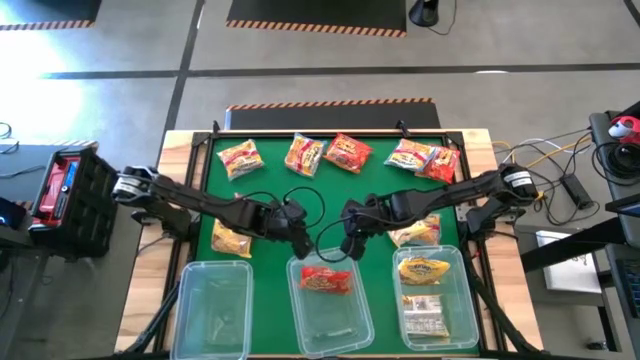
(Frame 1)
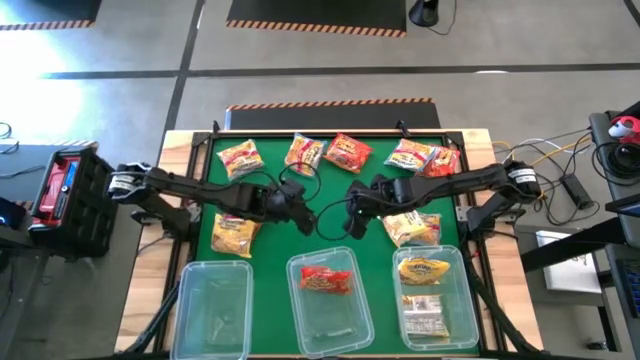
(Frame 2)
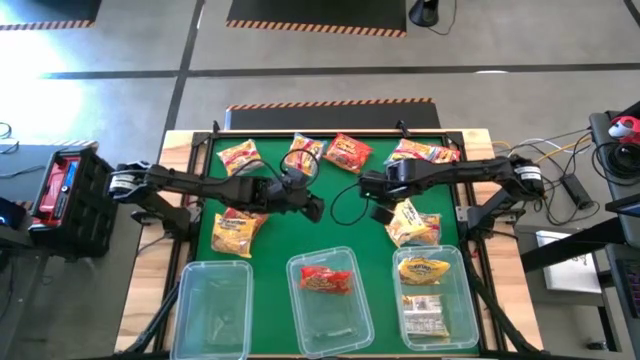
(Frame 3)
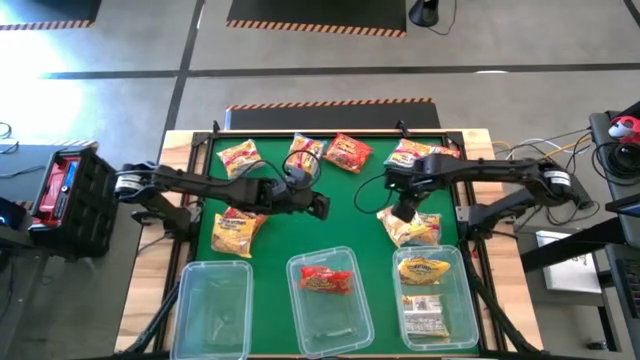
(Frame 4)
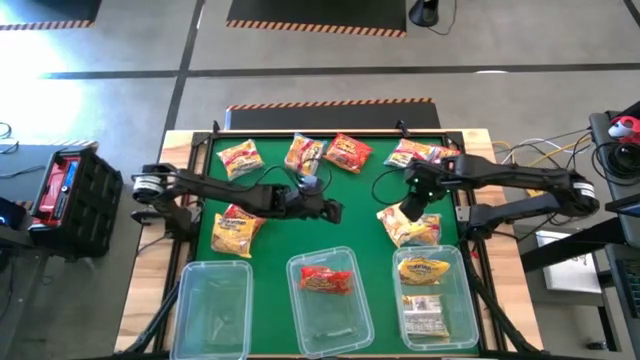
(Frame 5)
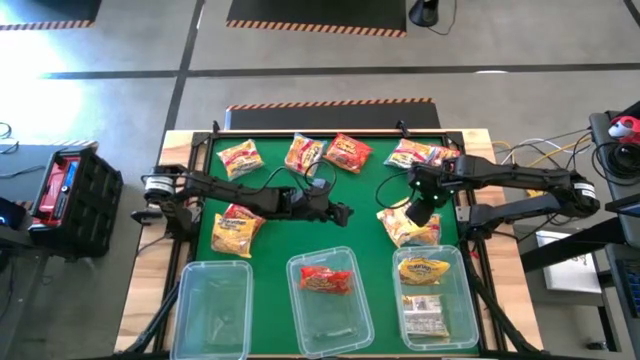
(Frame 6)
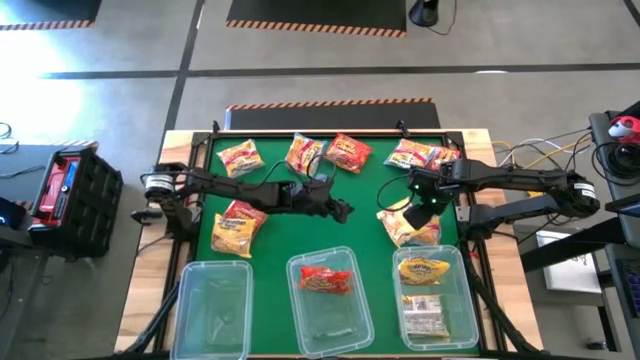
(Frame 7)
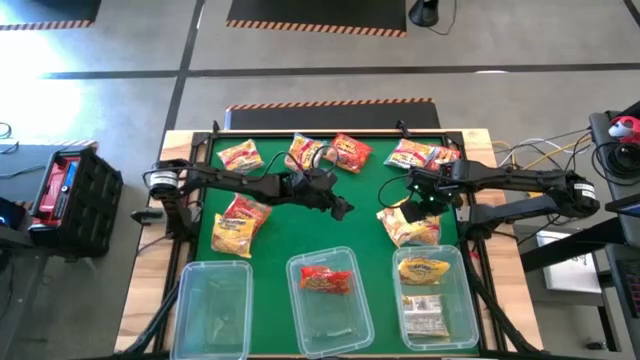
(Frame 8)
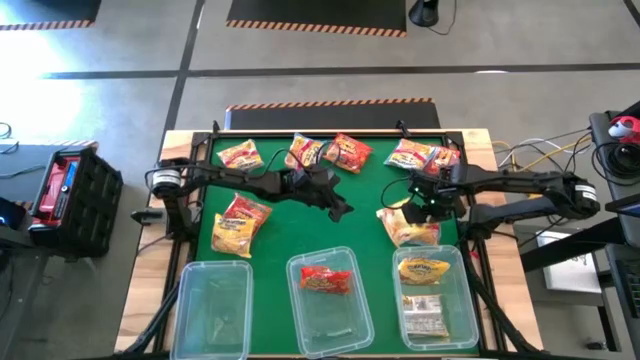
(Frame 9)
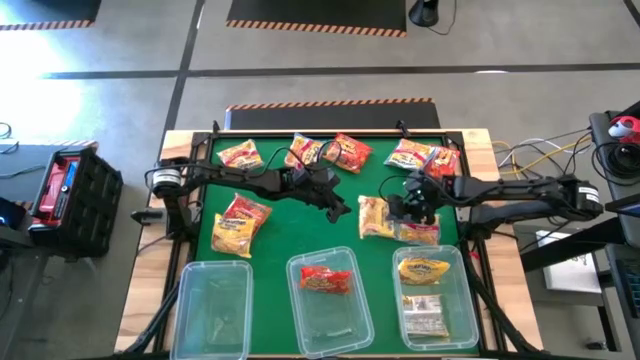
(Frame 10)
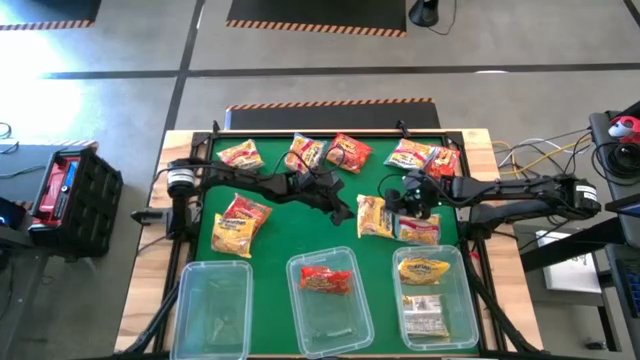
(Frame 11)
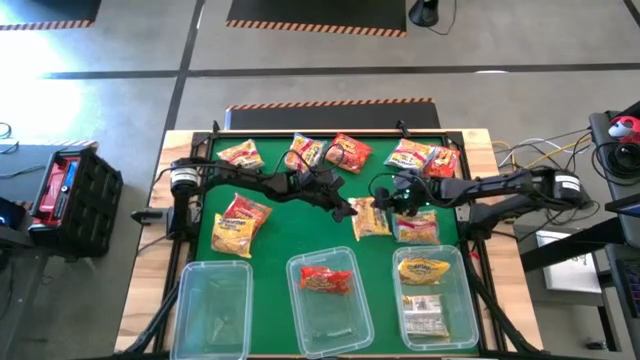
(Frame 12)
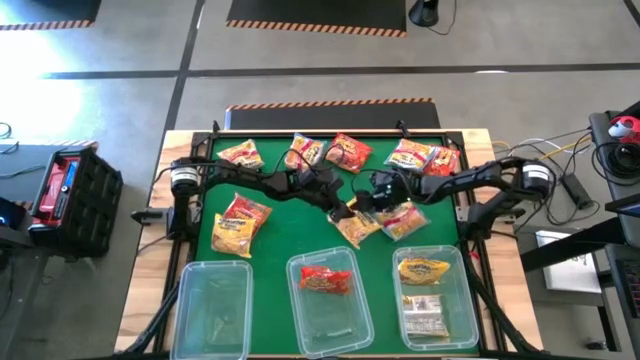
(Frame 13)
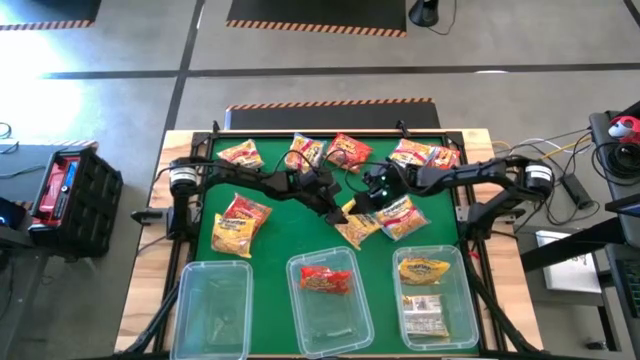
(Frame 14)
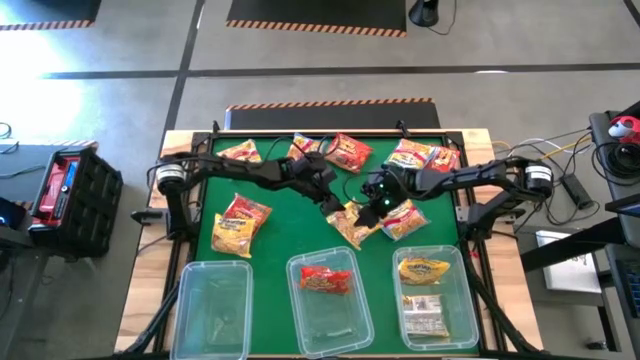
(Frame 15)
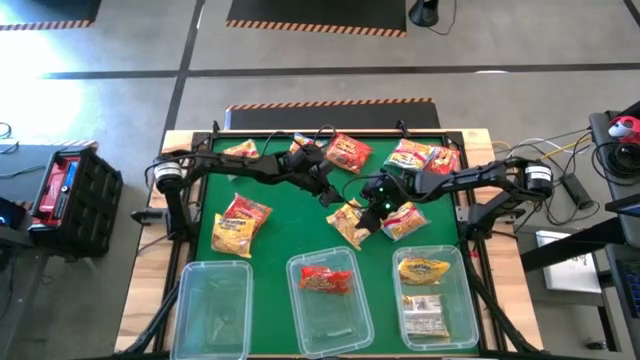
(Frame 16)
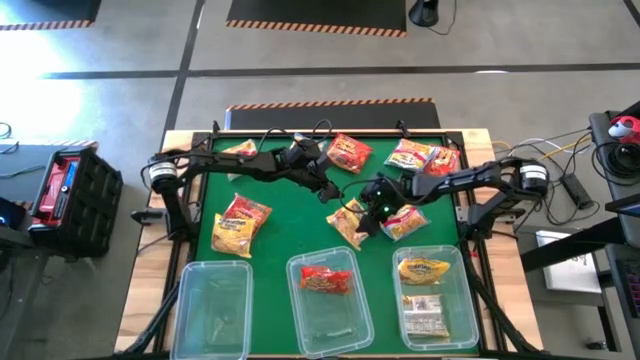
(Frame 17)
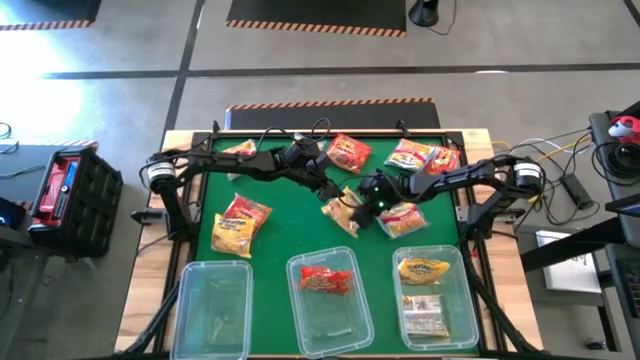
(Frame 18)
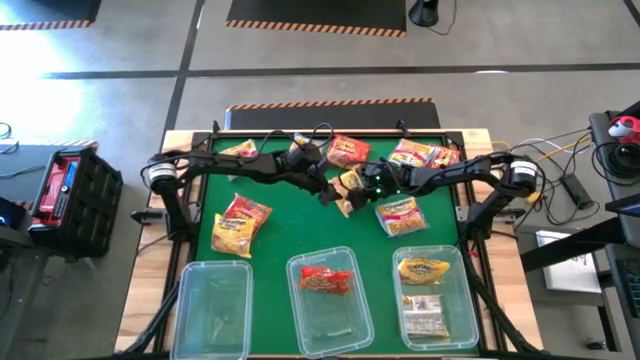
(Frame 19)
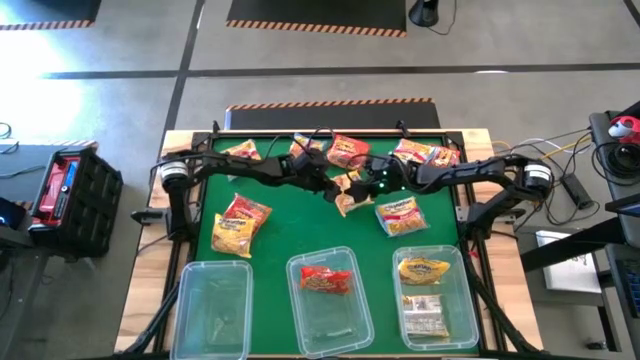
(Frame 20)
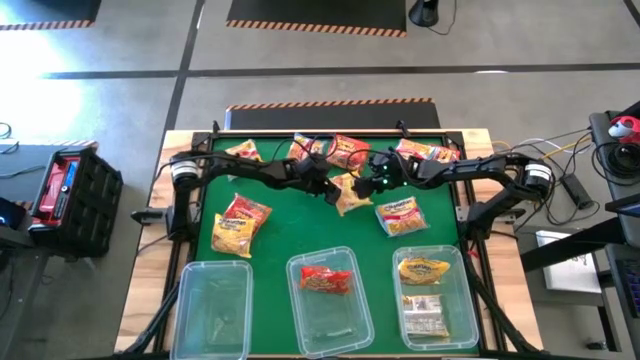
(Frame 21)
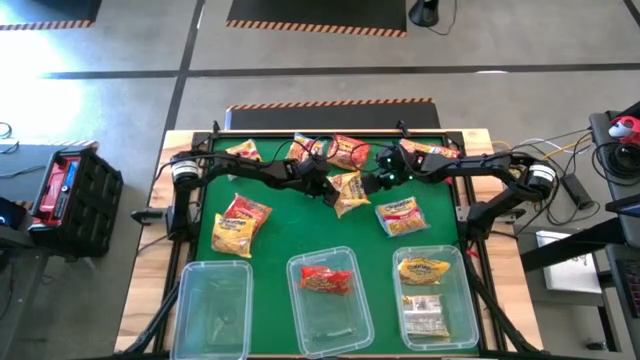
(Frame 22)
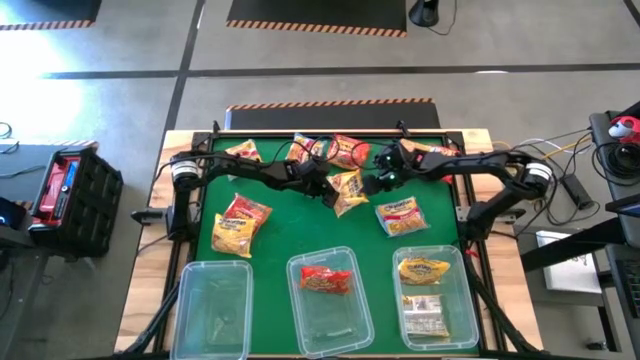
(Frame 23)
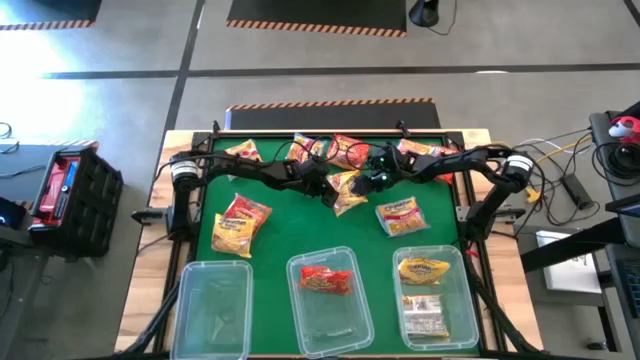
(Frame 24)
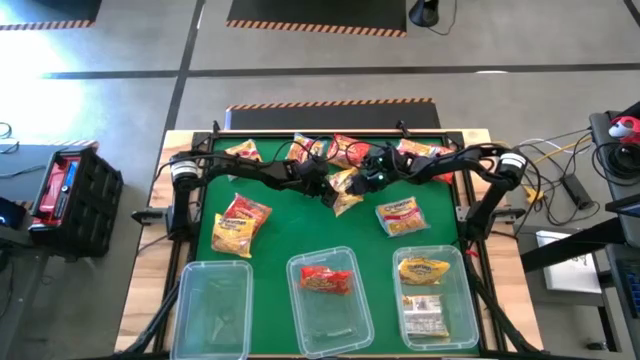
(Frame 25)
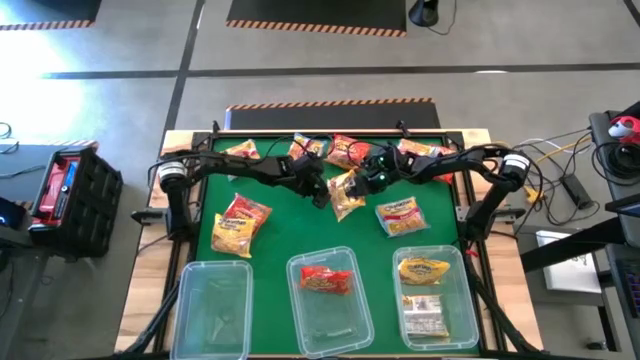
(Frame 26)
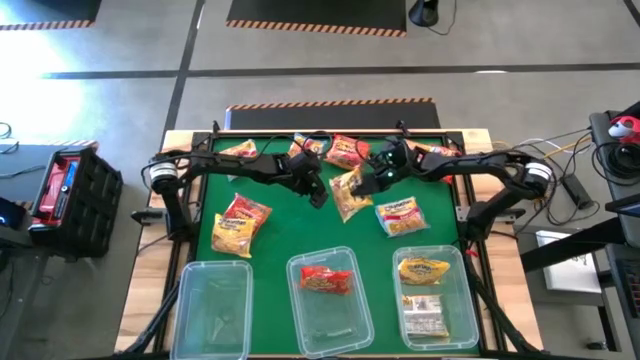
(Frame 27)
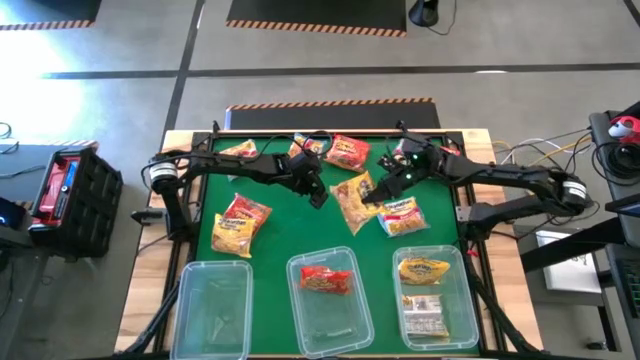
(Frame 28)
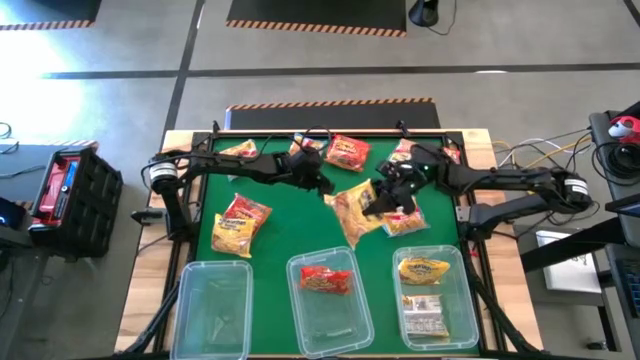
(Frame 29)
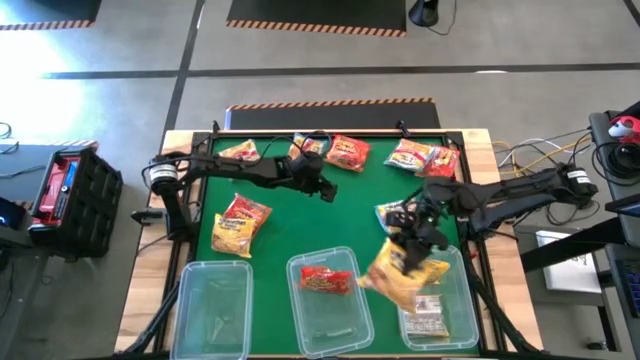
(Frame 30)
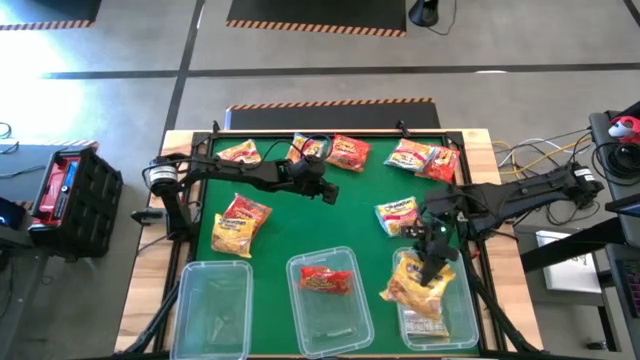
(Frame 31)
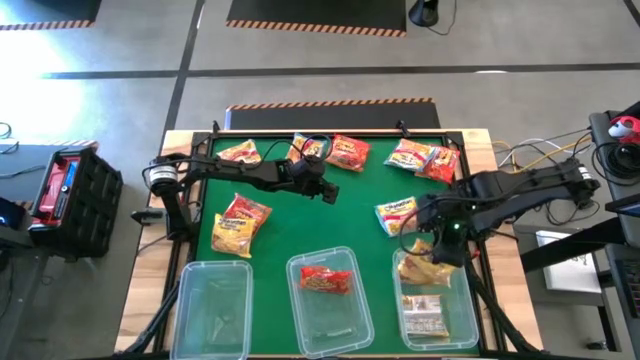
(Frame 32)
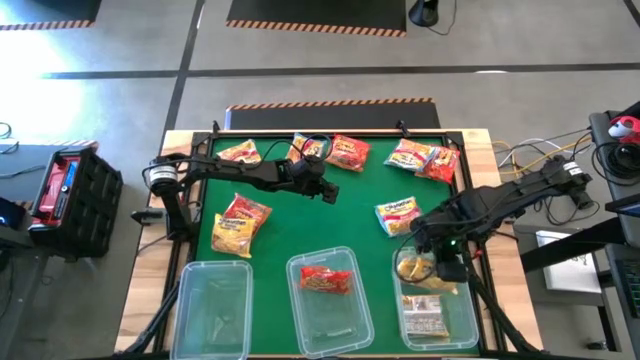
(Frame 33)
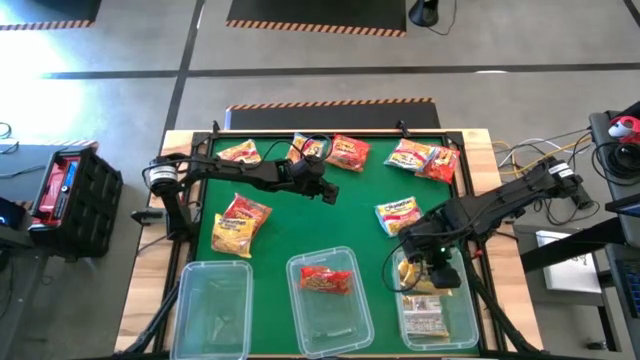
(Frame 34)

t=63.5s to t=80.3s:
Task: Sort Maruchan noodles
Put the yellow noodle pack into the right transparent bin

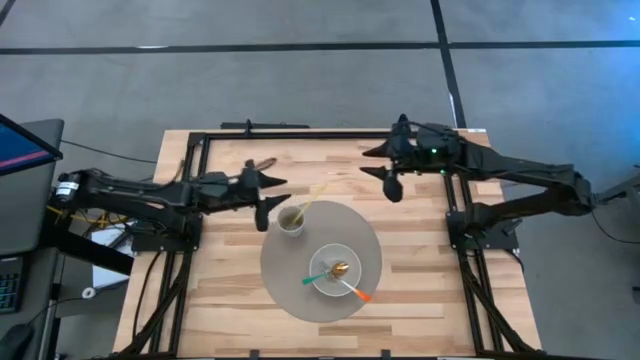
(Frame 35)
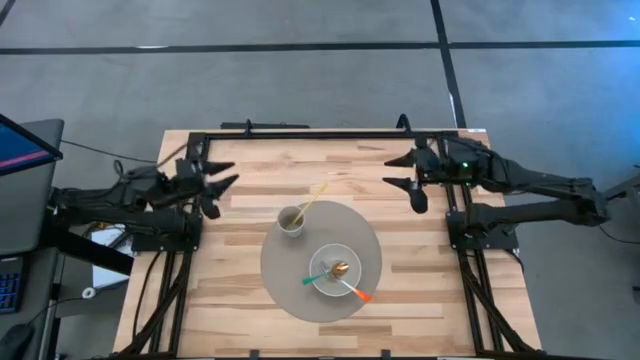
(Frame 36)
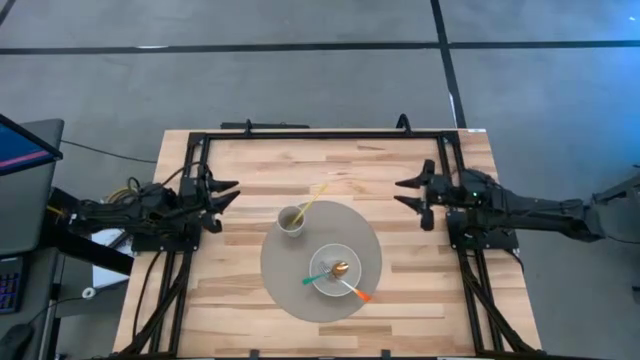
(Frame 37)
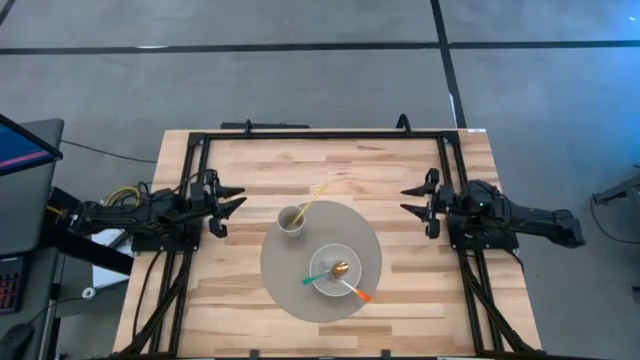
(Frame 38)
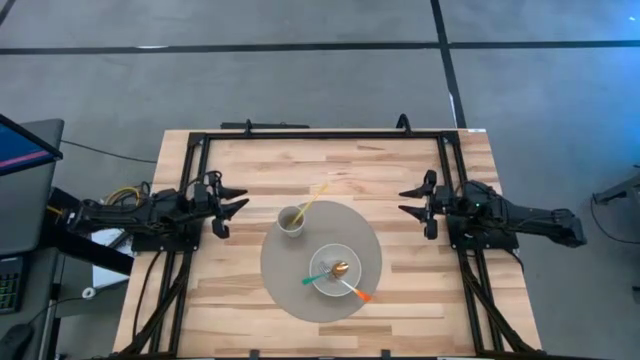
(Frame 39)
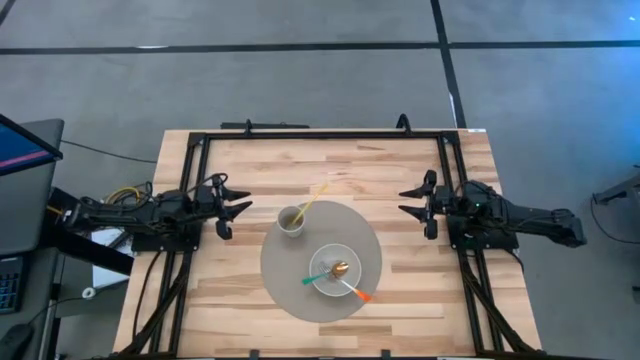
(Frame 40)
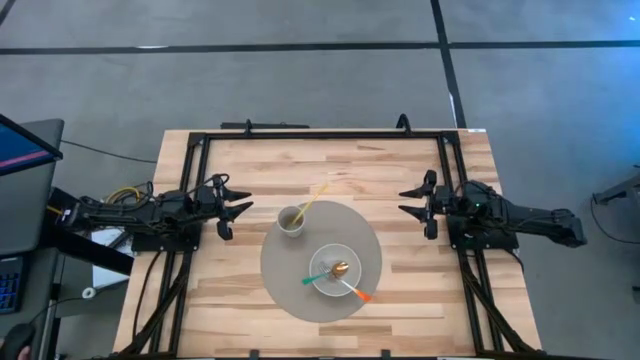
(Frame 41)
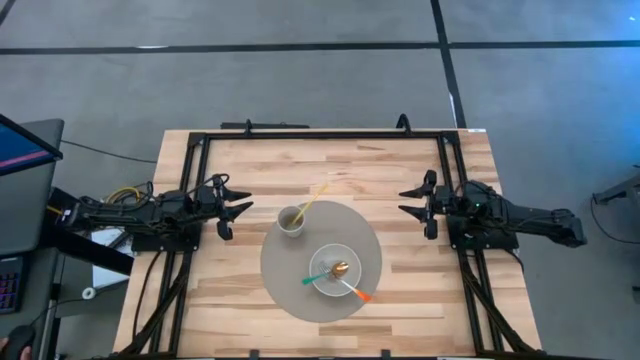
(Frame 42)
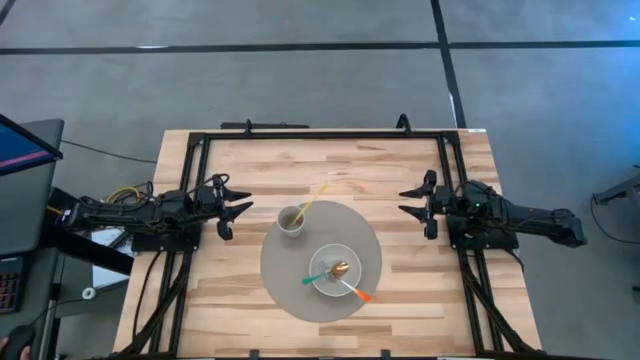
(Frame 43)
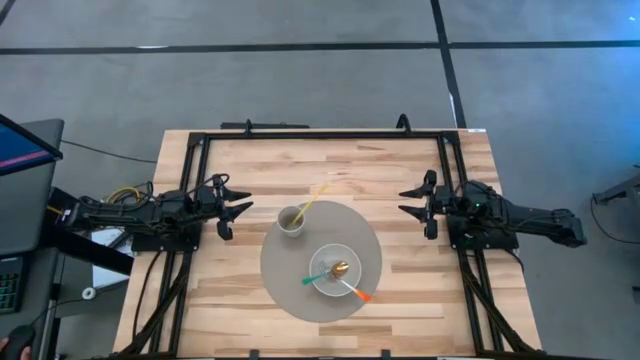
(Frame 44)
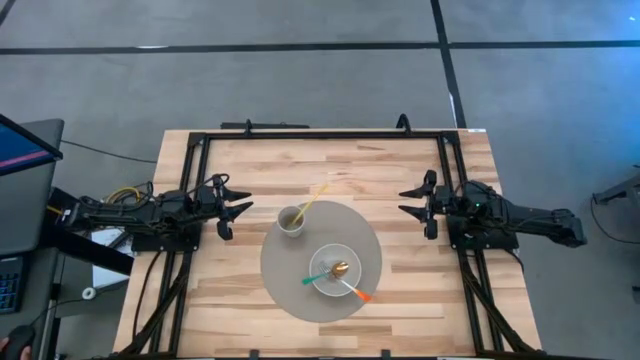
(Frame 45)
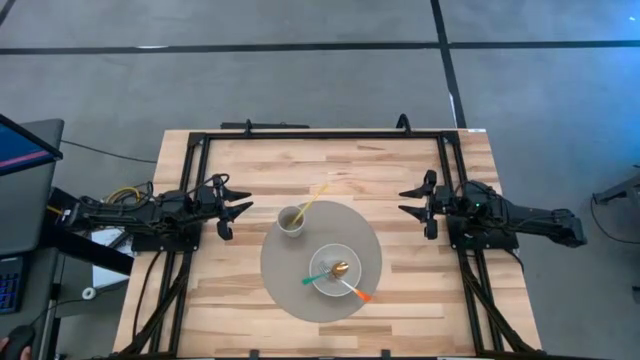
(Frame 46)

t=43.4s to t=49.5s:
Task: Pick & Place Utensil
Return to Home Position
